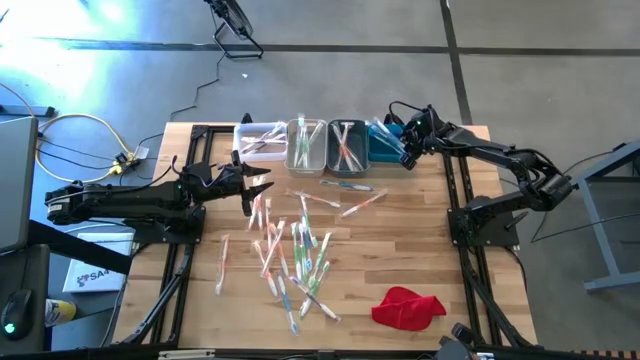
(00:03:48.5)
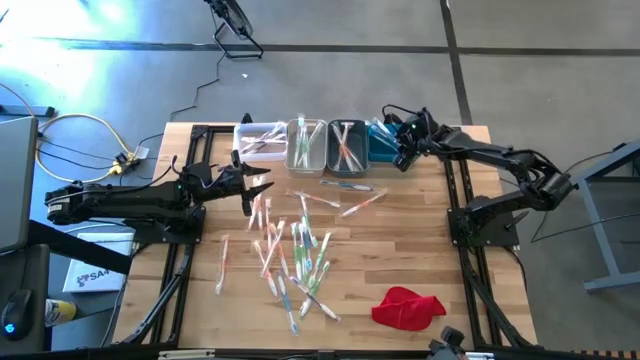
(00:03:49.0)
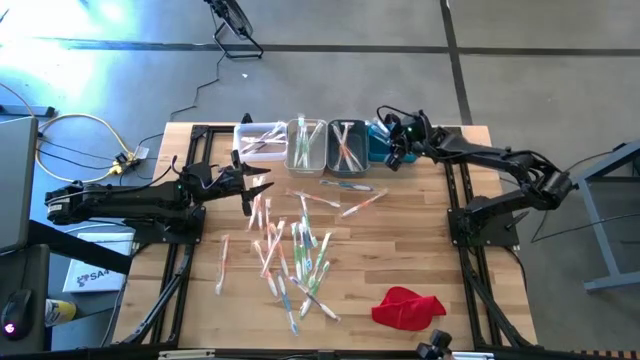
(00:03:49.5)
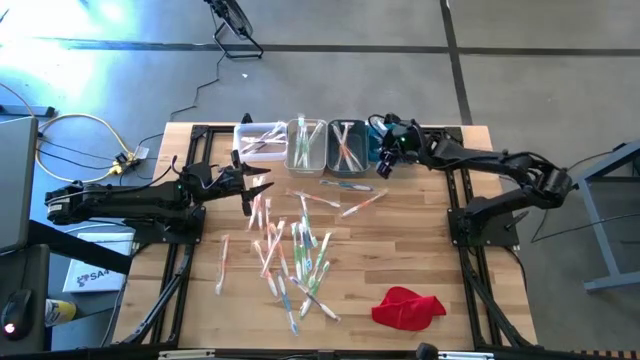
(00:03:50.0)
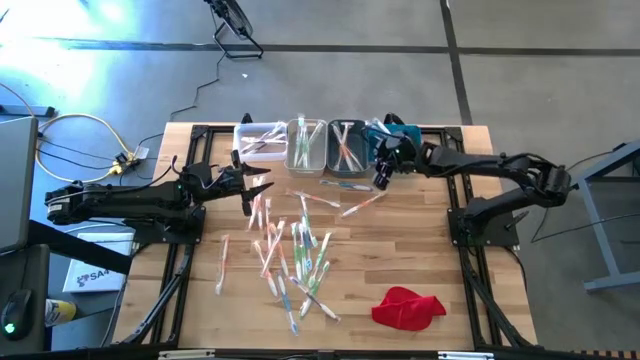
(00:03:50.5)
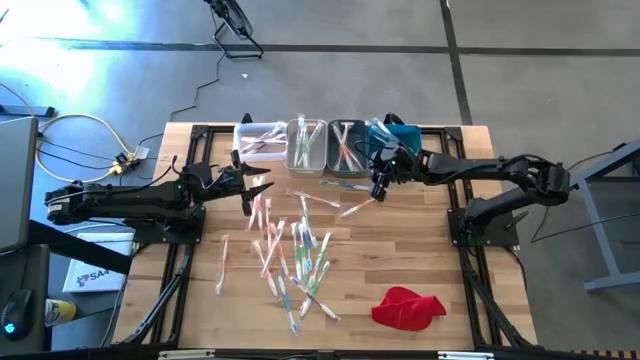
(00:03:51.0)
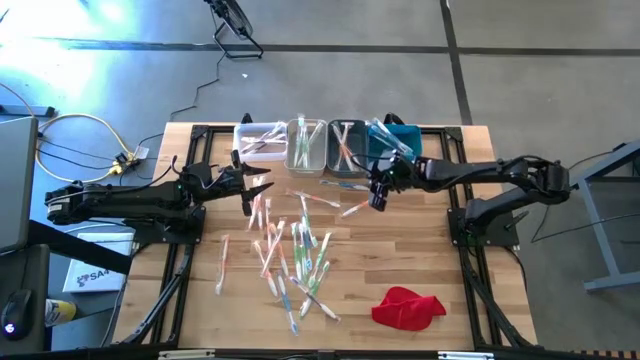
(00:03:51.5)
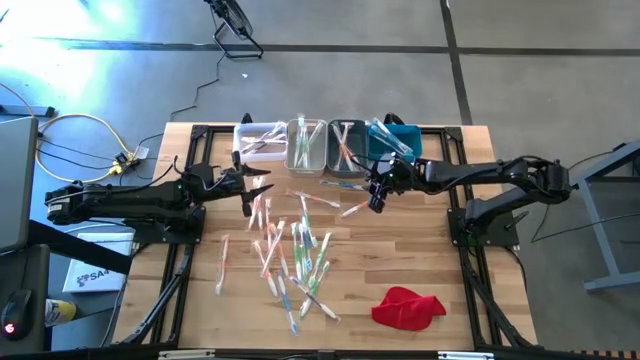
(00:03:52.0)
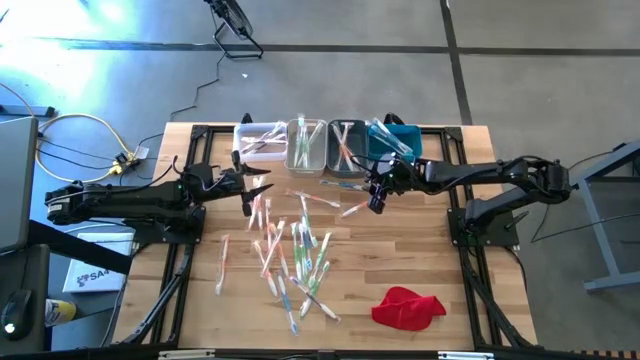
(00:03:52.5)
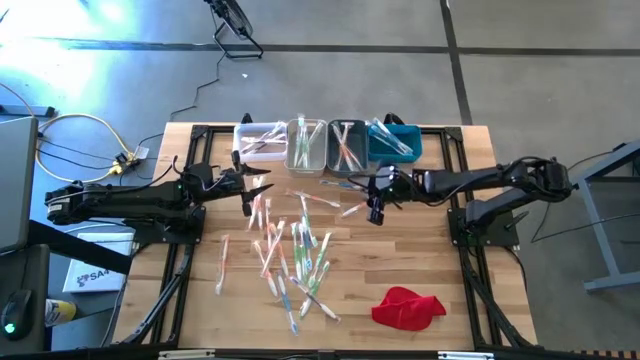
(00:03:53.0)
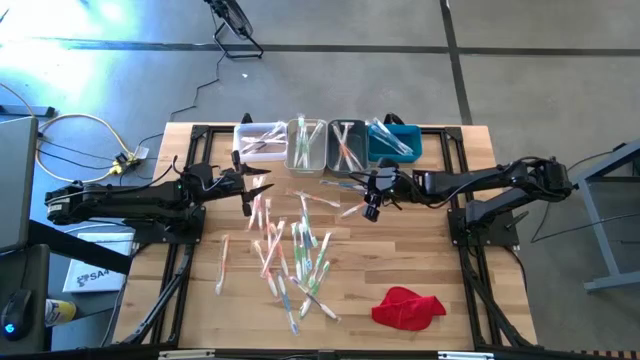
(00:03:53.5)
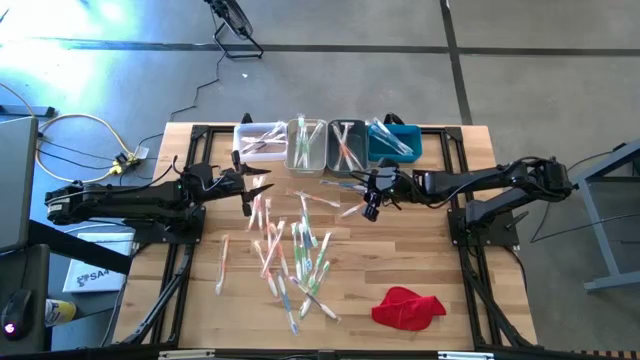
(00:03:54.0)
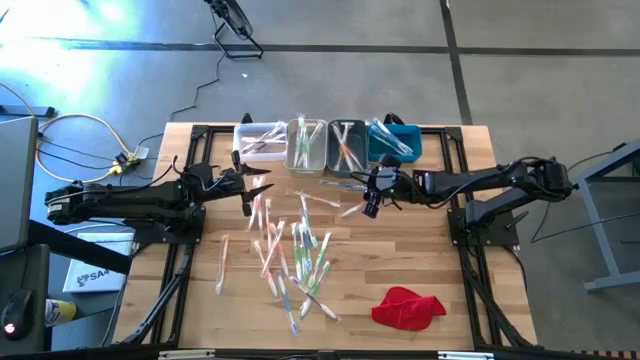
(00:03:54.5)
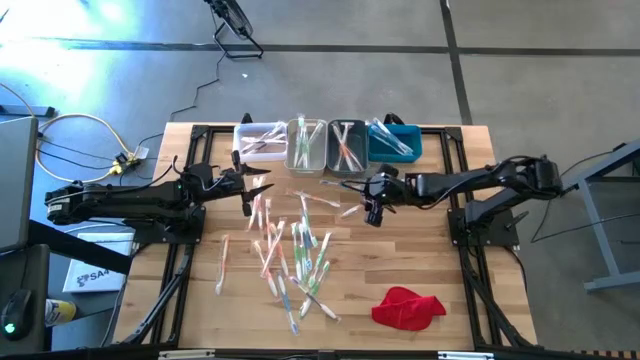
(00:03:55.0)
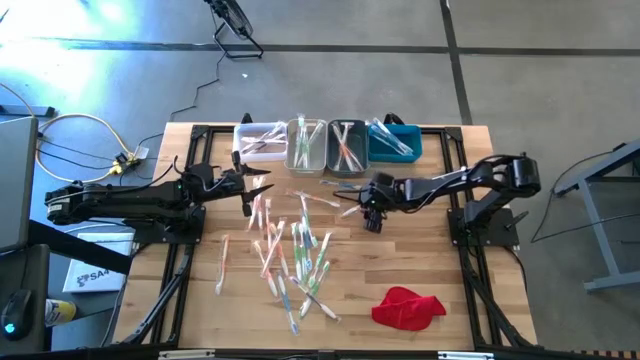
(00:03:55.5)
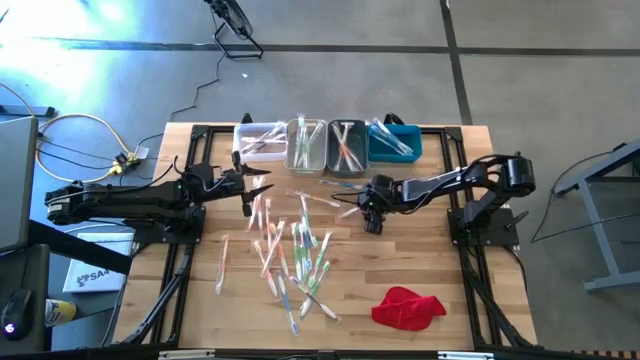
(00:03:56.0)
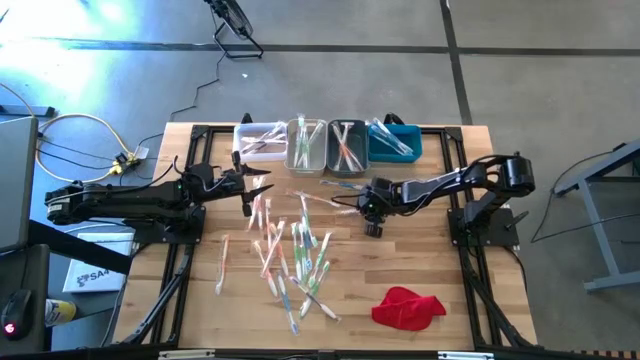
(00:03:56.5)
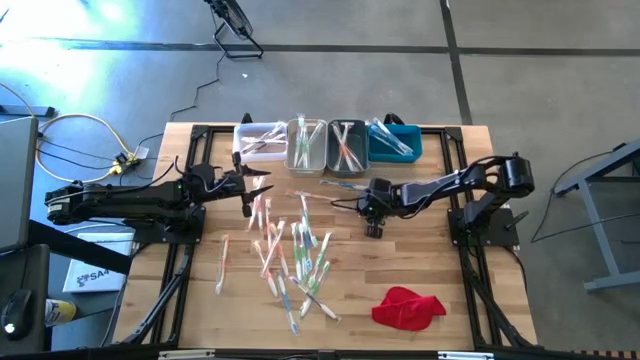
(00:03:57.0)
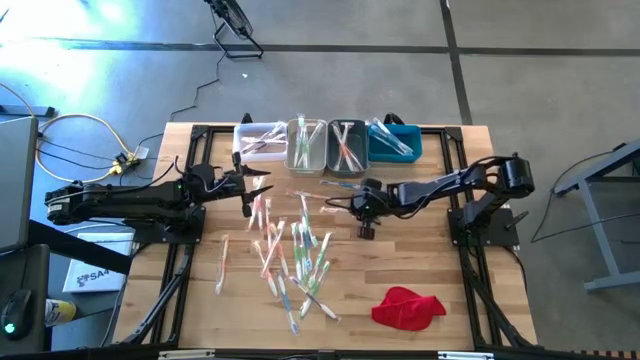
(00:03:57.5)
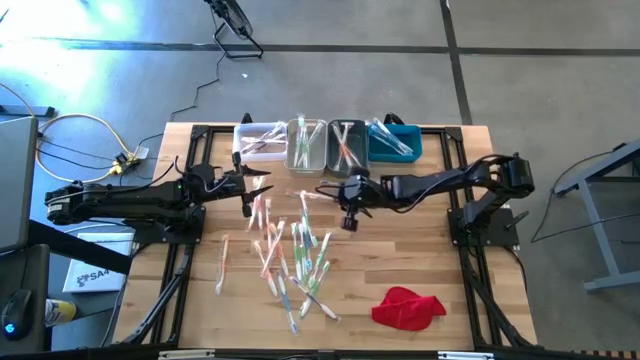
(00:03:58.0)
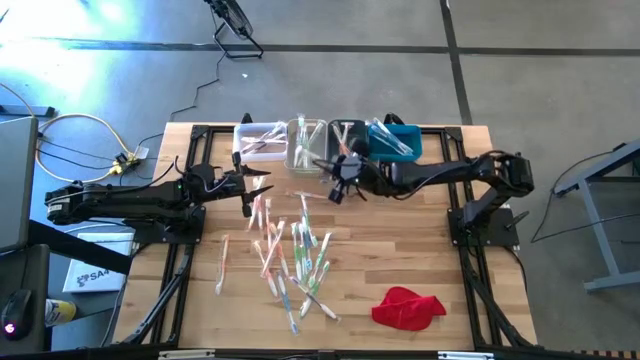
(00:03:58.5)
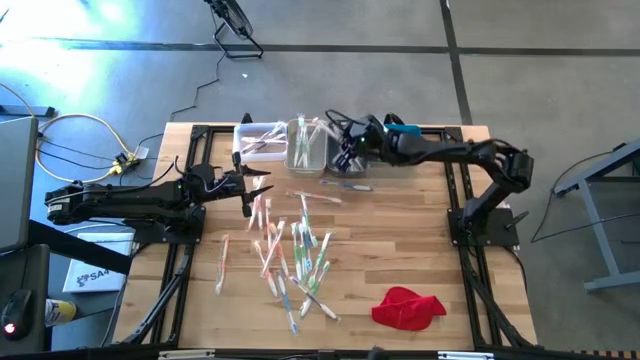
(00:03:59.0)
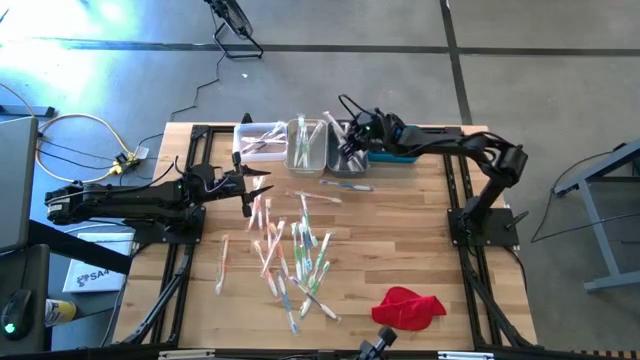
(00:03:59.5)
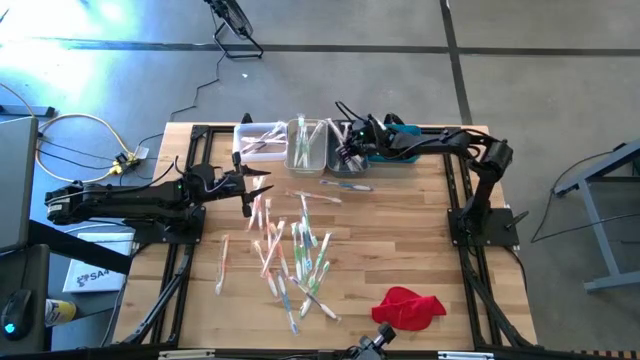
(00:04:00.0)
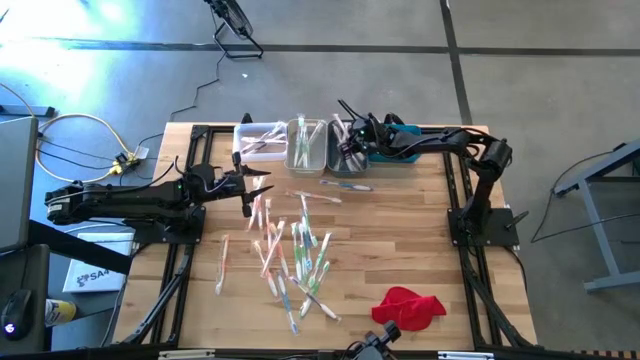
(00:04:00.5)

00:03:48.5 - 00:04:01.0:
Task: Pick & Place Toothbrushes
Put the orange toothbrush into the dark green bin

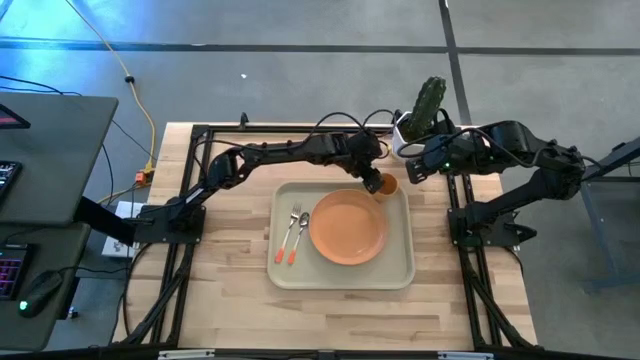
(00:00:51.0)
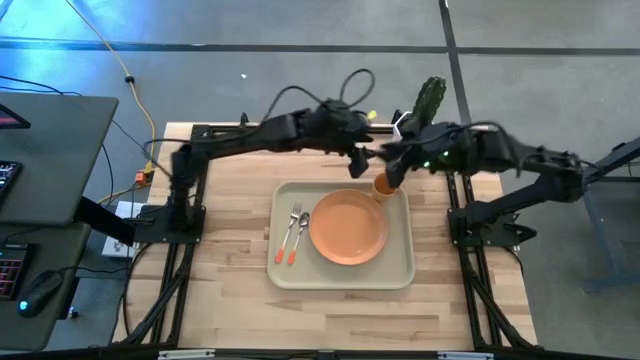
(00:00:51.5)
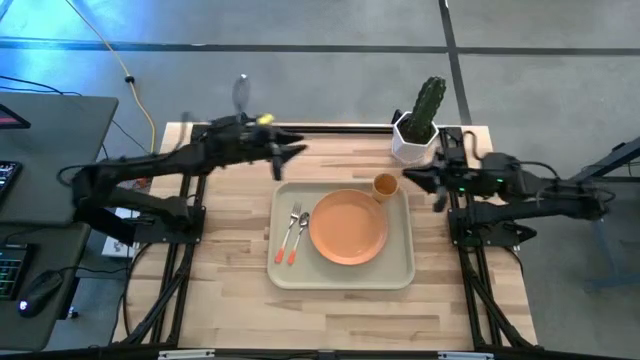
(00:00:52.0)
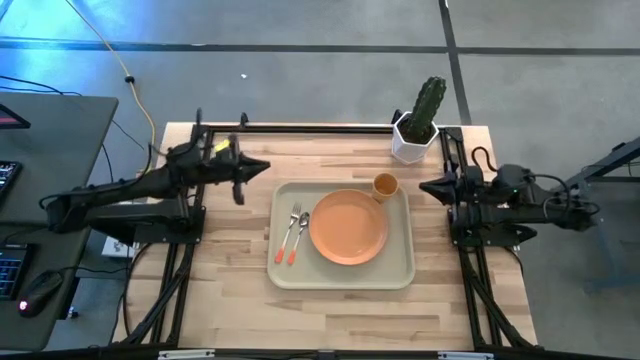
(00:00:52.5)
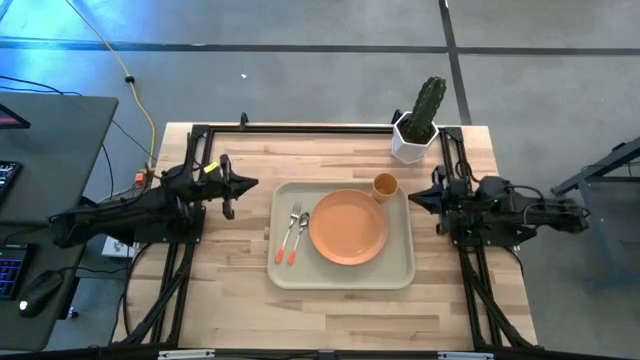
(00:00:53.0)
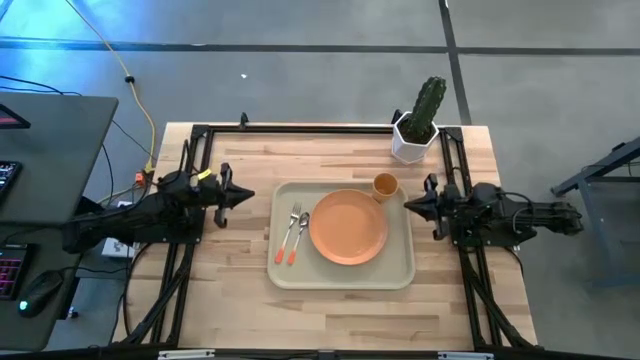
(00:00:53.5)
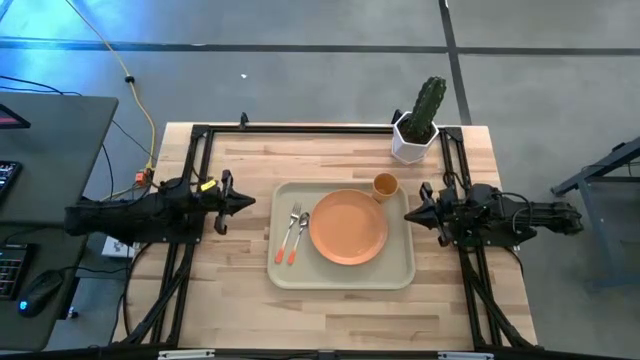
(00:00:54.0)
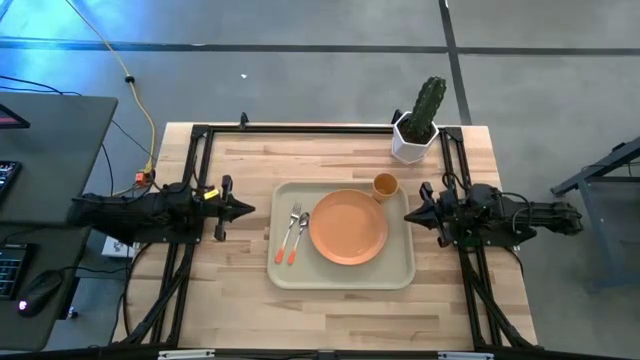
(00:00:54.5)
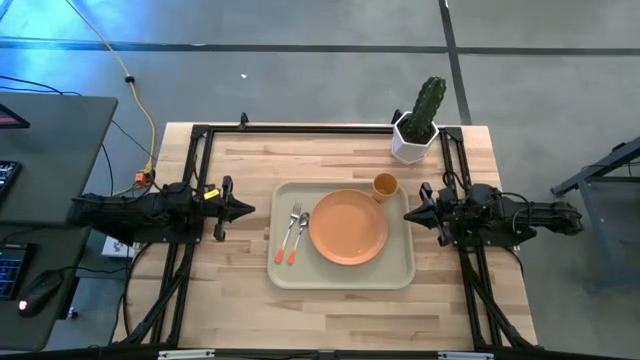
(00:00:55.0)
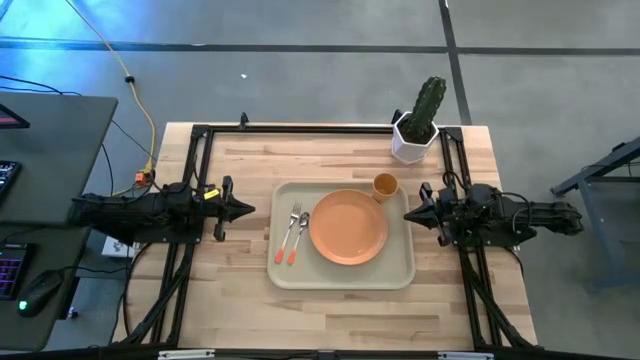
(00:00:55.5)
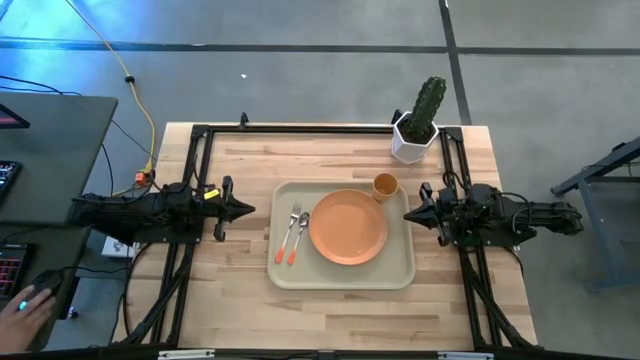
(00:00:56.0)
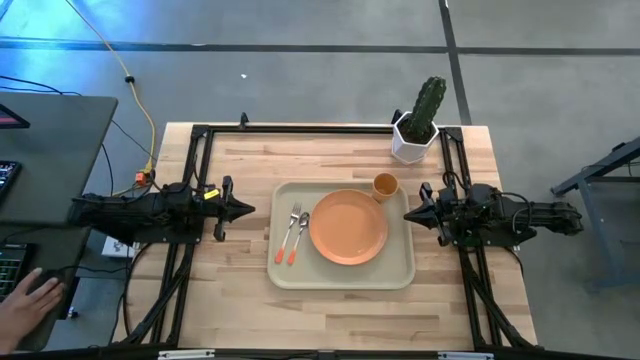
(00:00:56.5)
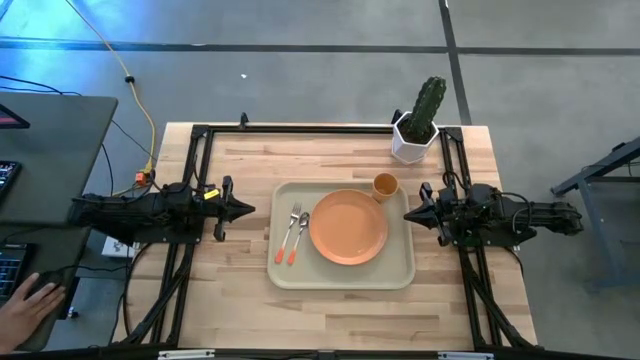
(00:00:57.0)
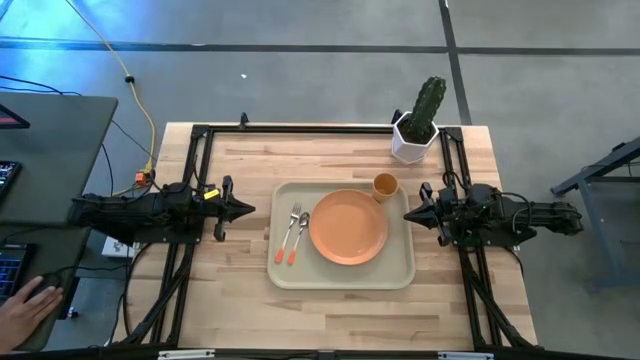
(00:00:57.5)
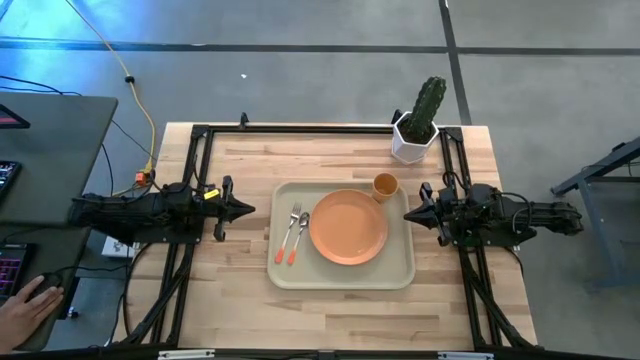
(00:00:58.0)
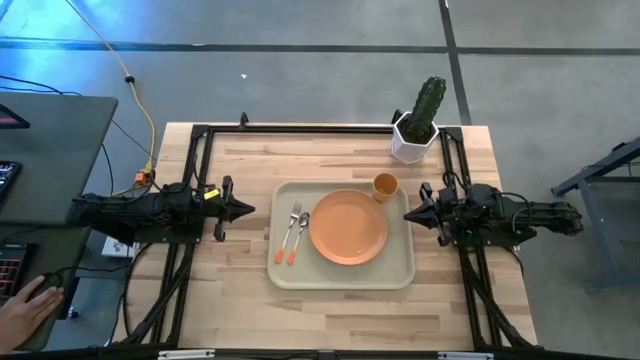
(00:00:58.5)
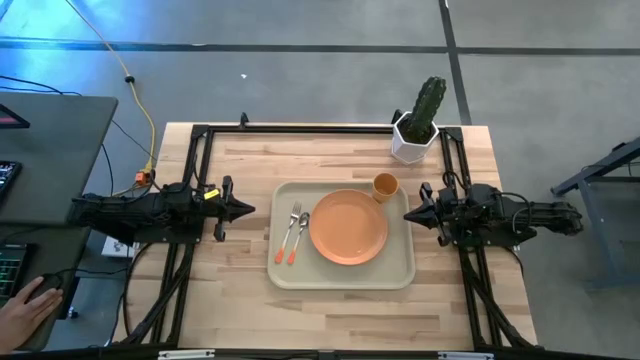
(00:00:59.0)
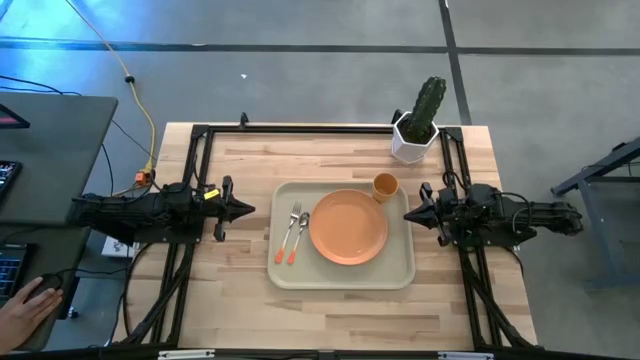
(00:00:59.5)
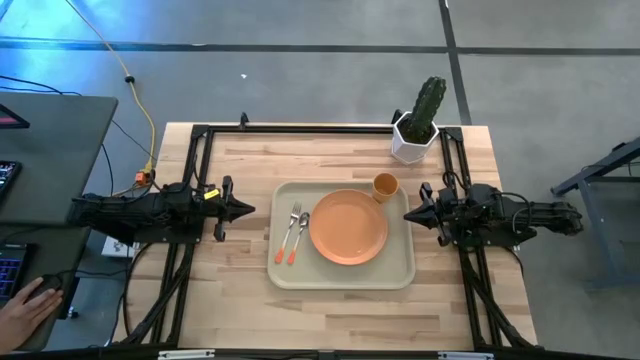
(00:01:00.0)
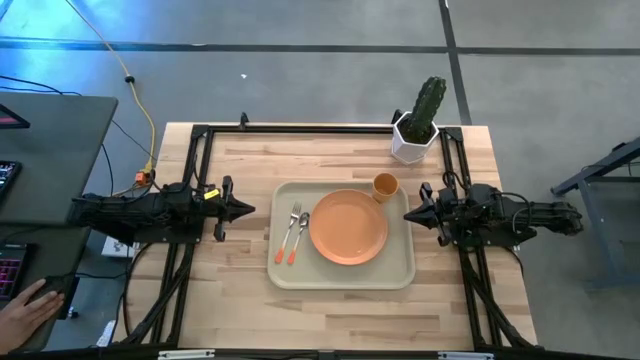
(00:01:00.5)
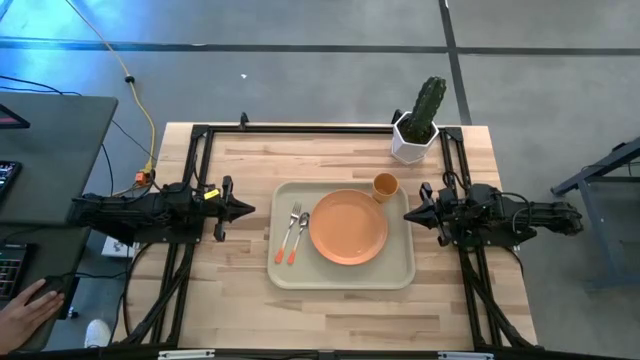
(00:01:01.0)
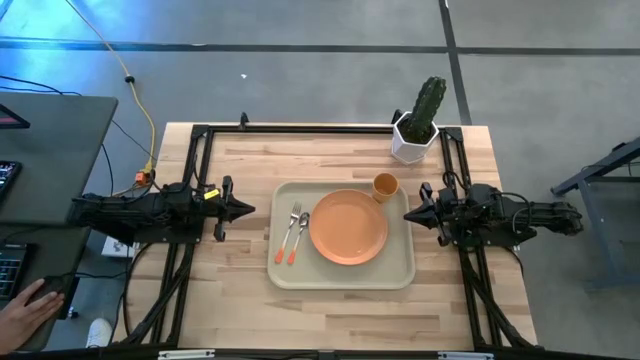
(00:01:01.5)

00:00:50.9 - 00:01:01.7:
Task: Pick and place plate/cup/fork/spoon on tray
Return to Home Position
